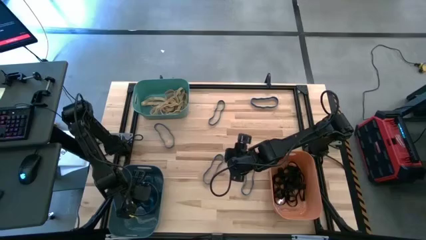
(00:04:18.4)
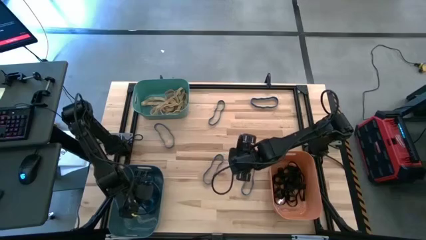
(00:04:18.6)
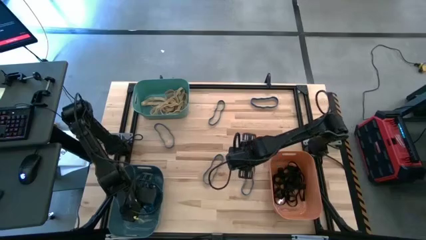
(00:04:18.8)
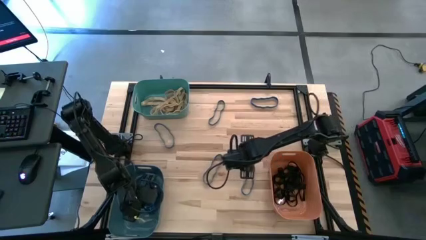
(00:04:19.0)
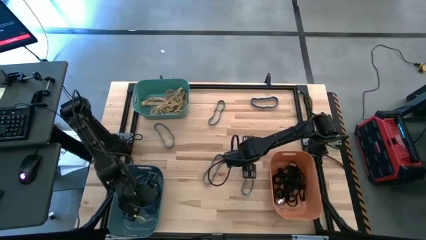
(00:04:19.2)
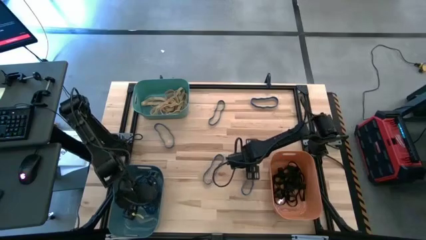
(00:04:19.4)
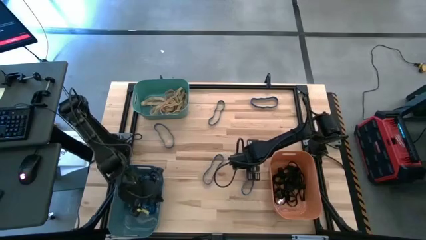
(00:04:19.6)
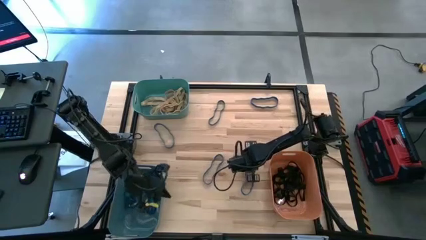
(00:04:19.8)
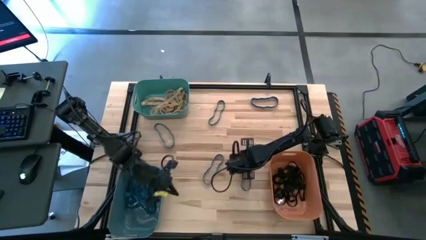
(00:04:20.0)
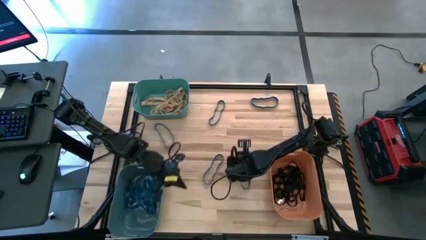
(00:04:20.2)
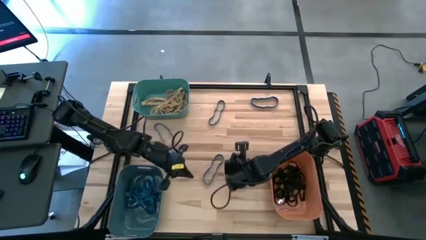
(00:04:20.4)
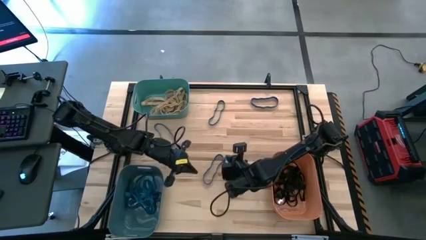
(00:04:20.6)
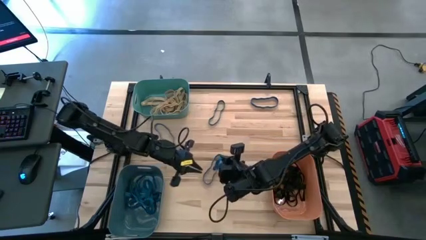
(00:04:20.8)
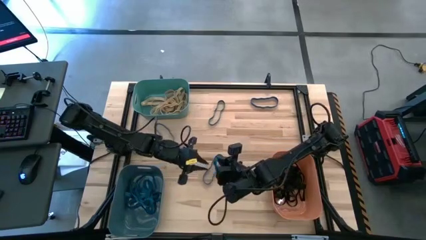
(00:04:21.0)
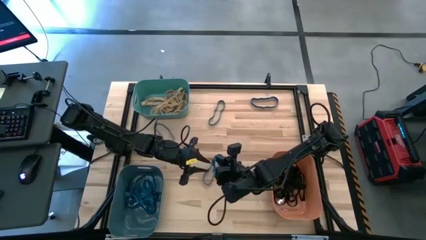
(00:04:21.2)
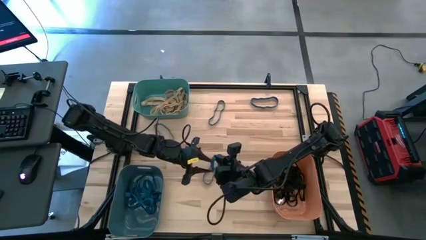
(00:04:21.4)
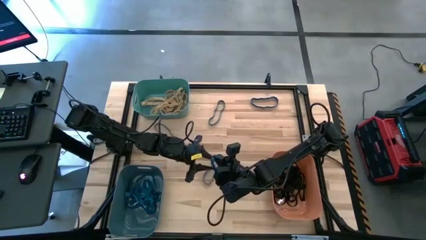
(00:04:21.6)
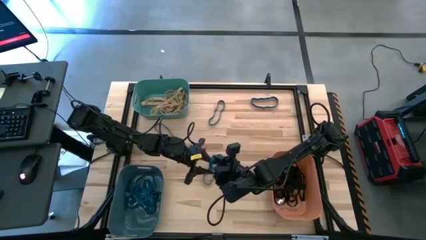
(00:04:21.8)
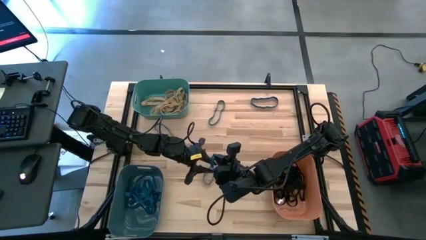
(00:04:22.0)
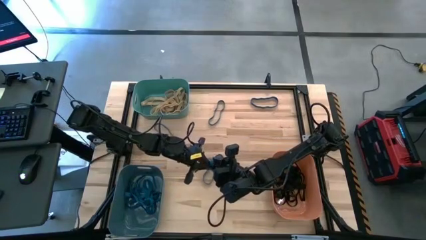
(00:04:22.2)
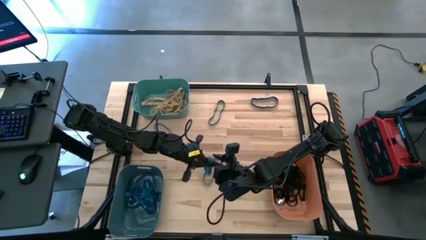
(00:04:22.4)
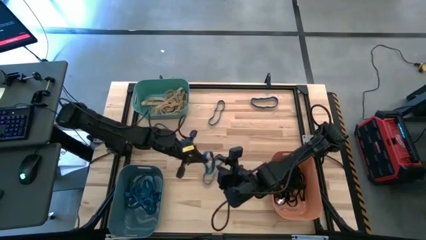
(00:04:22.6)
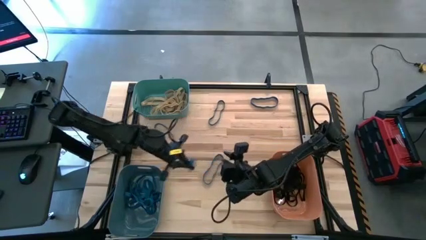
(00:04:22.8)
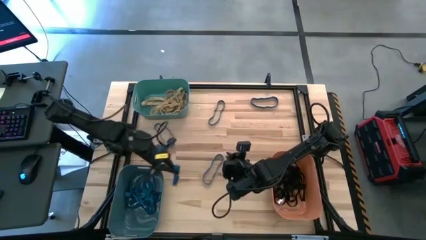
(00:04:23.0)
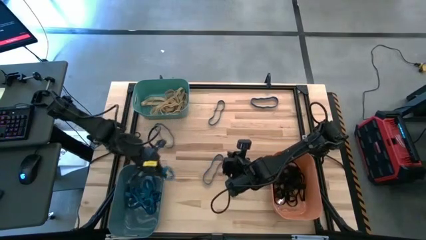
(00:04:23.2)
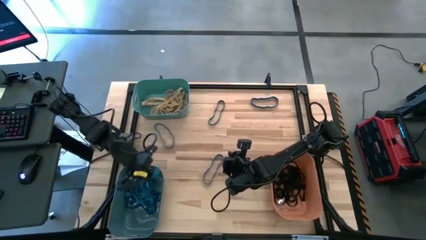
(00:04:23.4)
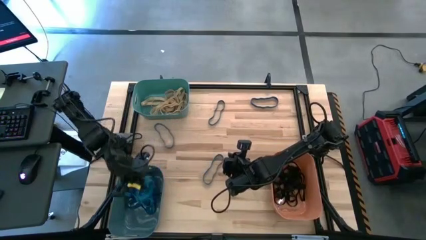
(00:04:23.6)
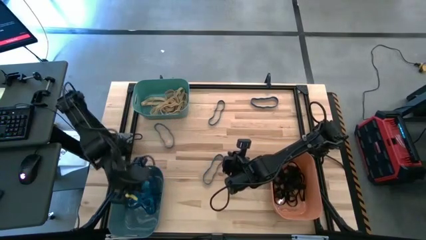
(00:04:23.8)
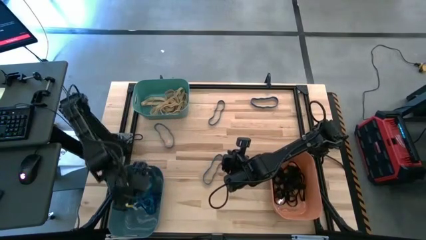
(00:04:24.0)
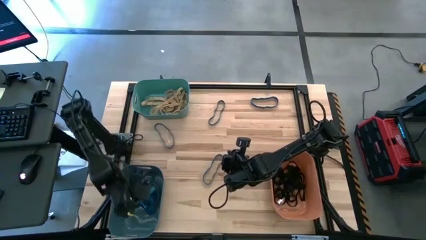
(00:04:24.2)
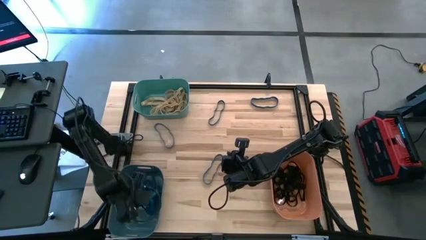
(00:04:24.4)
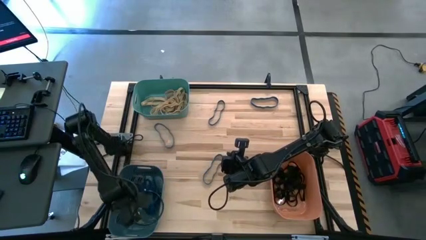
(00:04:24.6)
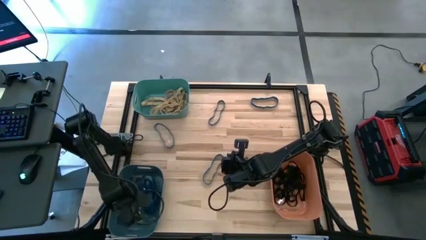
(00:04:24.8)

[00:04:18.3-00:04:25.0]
Task: Sort rubber bands into baskets
Put the blue rubber band into the blue bin

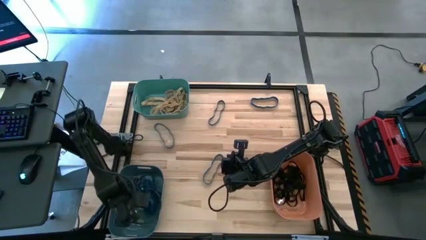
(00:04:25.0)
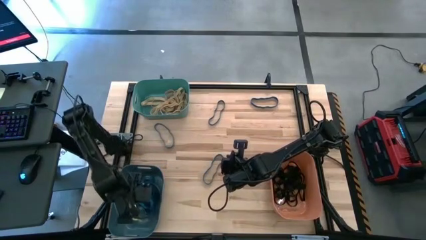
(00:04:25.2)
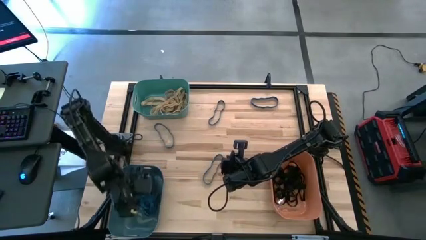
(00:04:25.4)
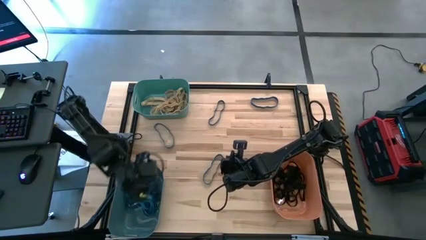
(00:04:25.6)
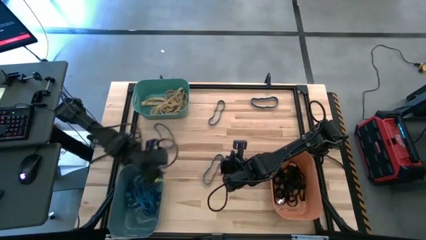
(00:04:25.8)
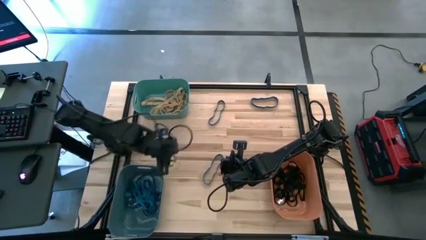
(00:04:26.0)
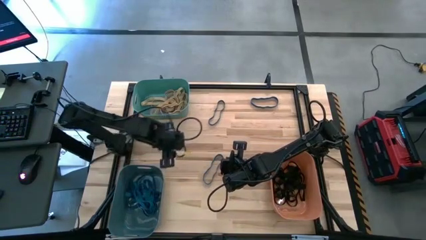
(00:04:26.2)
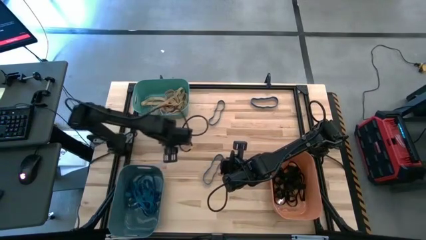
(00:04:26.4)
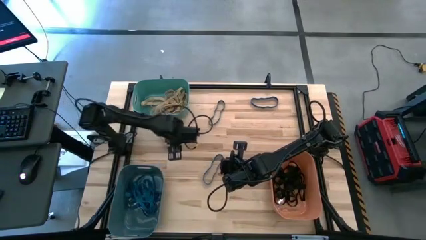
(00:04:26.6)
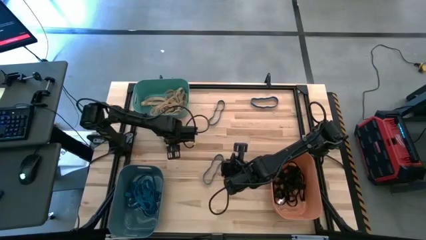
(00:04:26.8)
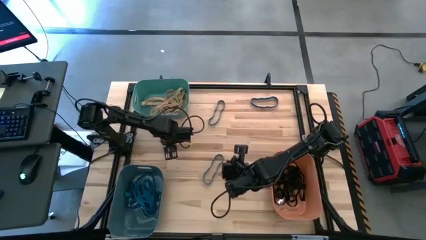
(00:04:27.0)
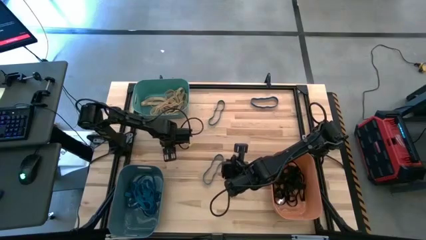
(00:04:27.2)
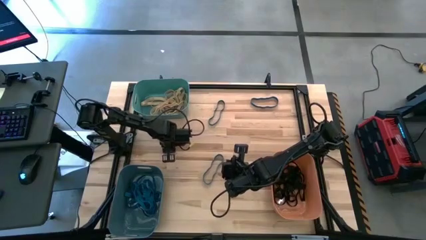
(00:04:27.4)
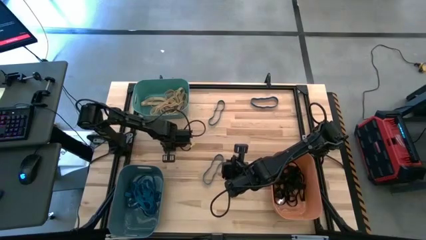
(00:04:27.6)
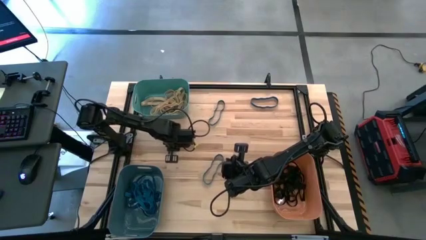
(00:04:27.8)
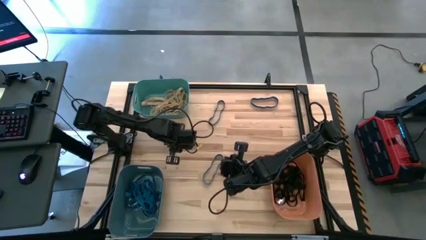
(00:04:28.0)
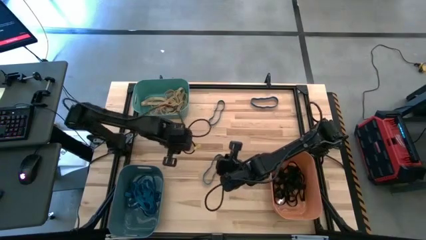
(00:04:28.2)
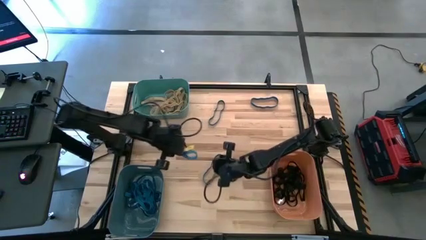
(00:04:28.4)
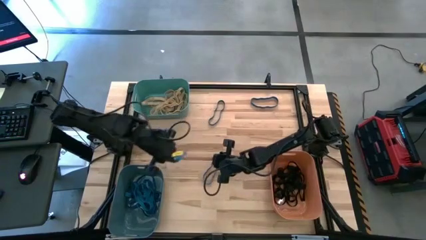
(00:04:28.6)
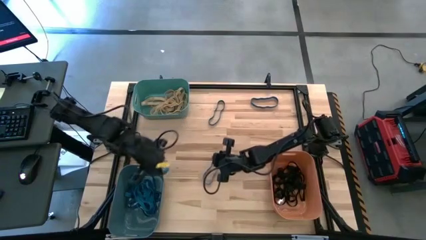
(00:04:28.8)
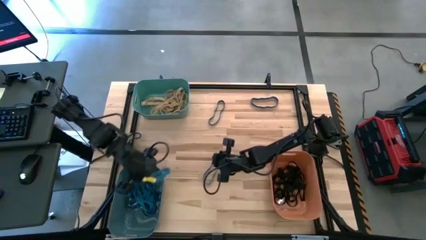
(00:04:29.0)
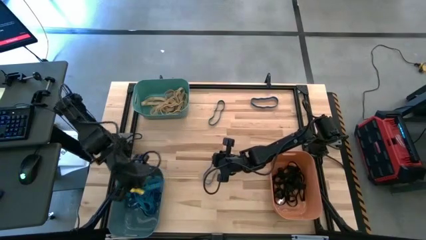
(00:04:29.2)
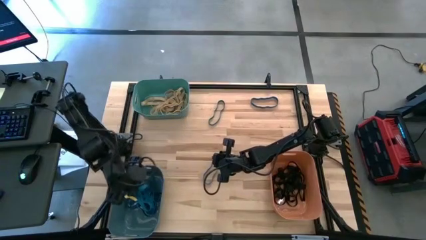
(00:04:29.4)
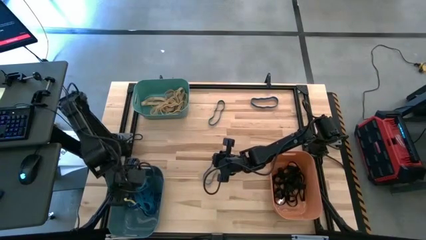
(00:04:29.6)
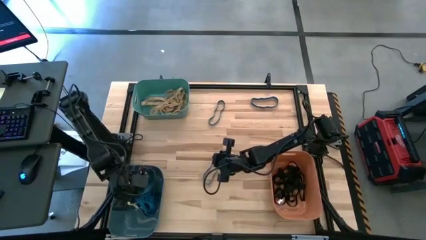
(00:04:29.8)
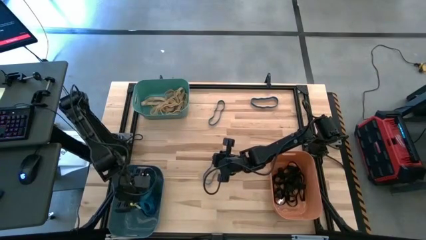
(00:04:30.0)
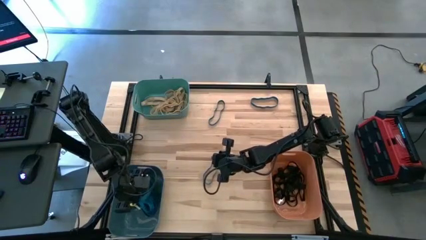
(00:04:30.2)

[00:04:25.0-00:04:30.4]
Put the blue rubber band into the blue bin

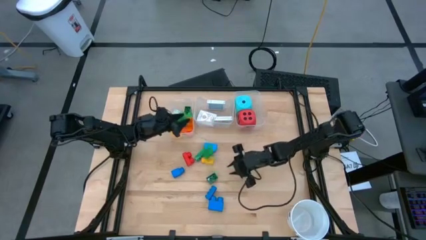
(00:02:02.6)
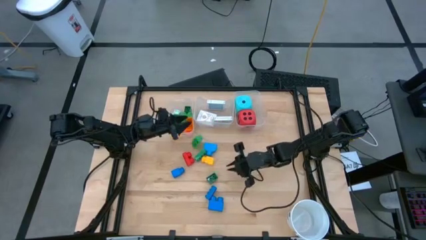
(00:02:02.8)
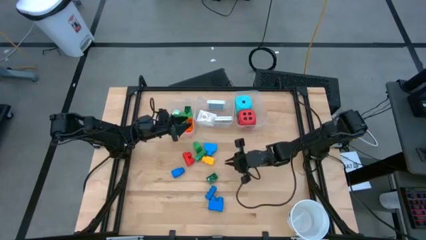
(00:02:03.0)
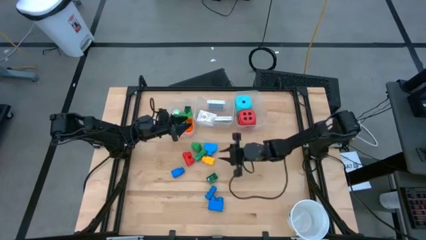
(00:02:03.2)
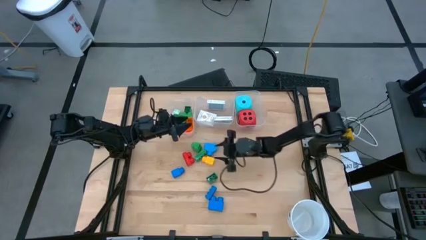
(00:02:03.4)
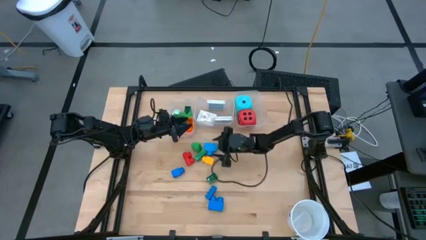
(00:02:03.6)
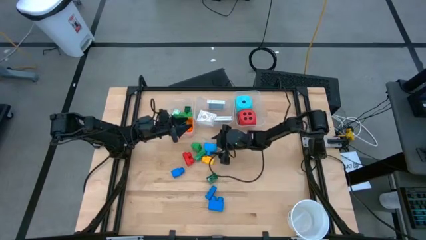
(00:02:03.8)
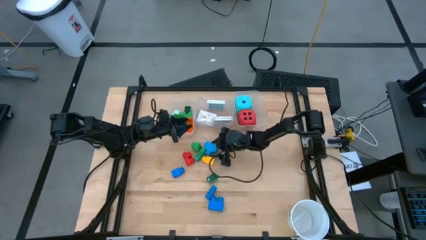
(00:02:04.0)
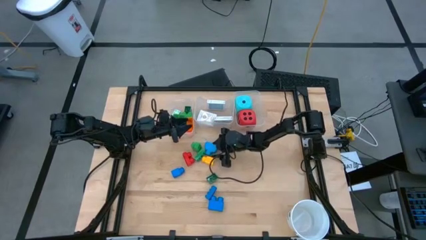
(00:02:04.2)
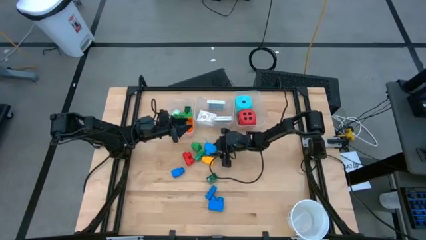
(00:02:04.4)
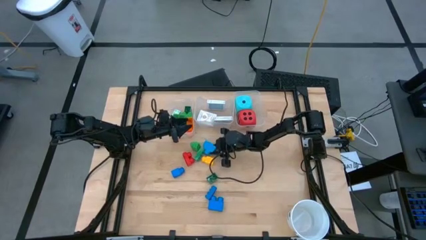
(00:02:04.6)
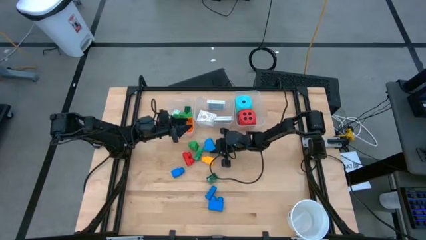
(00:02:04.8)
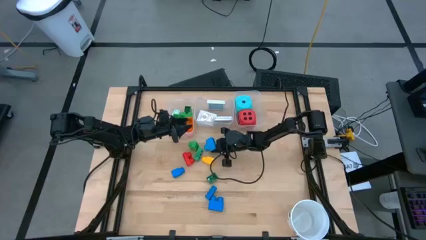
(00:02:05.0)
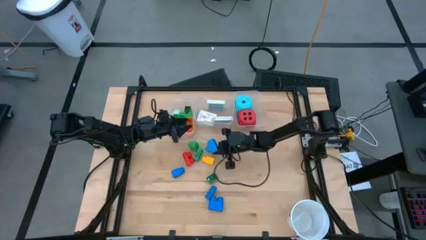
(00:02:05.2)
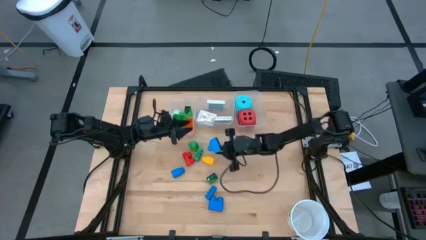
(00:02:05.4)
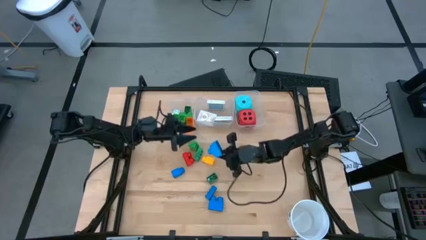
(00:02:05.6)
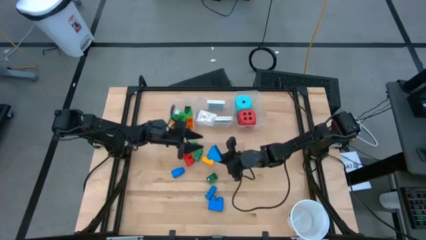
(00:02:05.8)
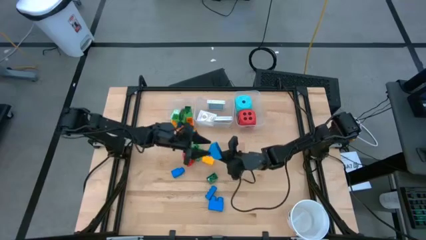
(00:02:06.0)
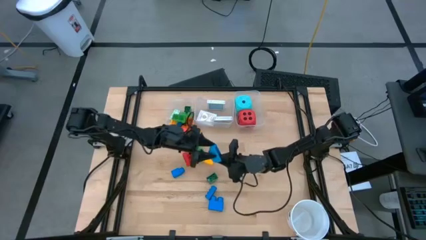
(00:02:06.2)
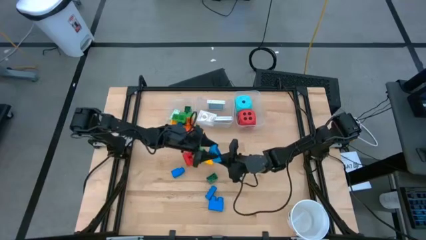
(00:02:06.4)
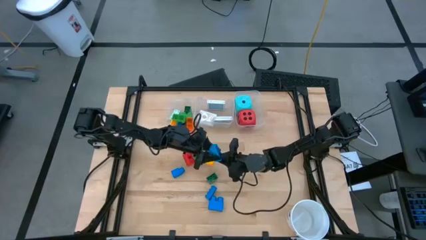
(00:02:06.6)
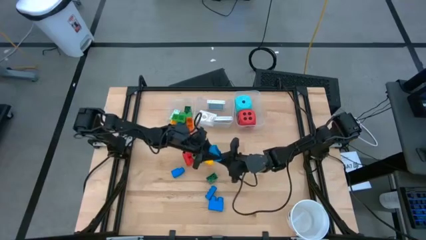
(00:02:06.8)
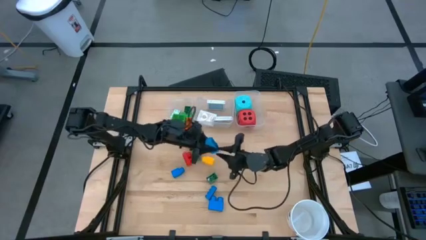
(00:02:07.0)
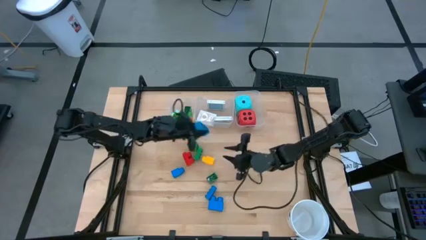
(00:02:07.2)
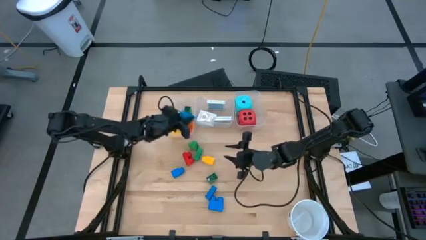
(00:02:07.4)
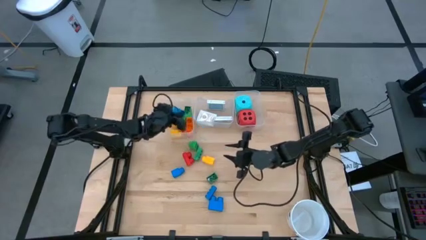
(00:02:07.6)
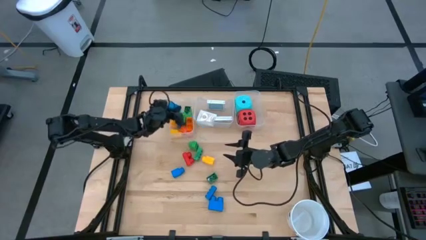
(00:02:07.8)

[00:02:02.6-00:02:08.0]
Task: Pick & Place Toys
Put the blue game piece into the left transparent bin
